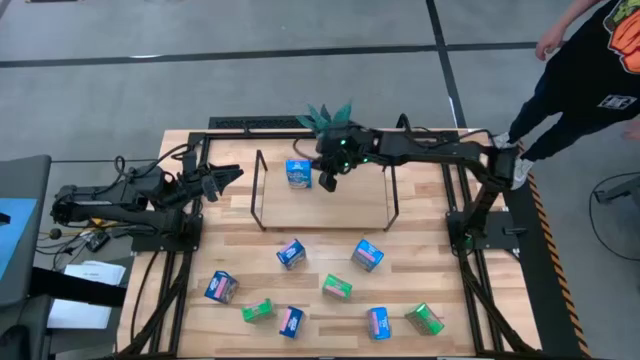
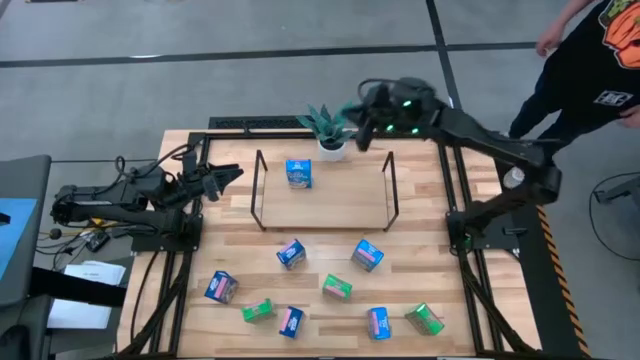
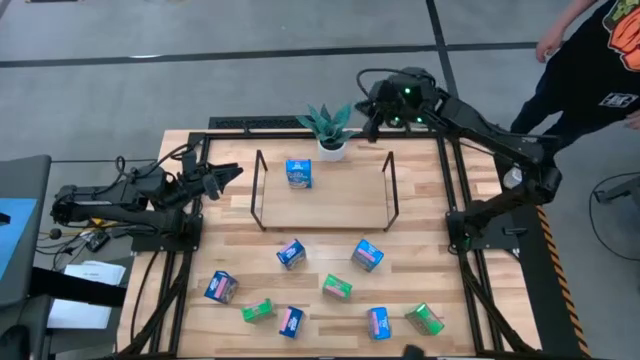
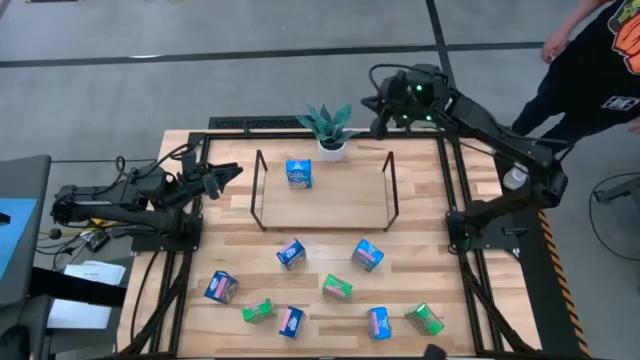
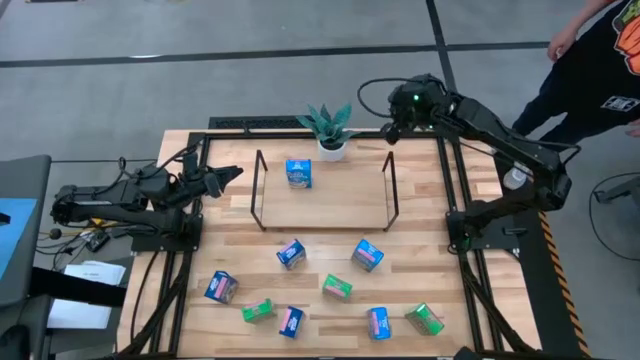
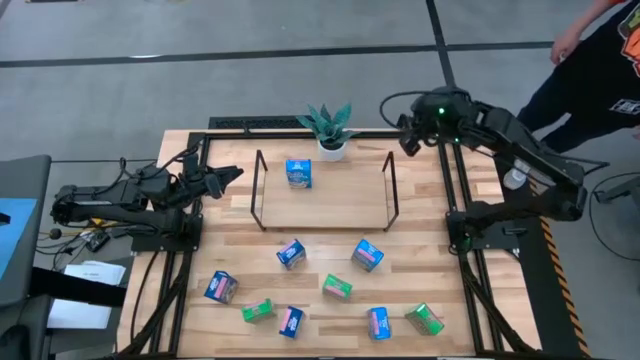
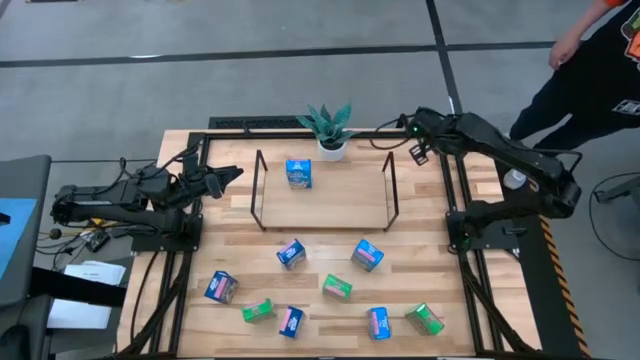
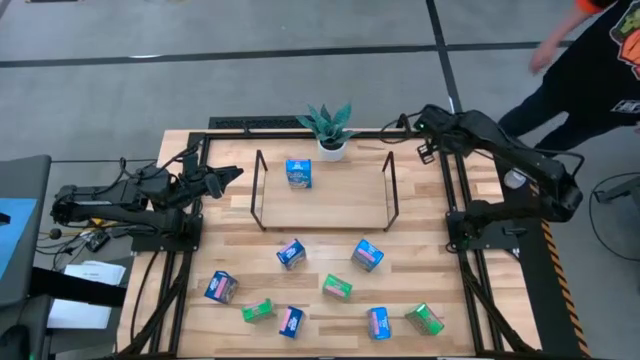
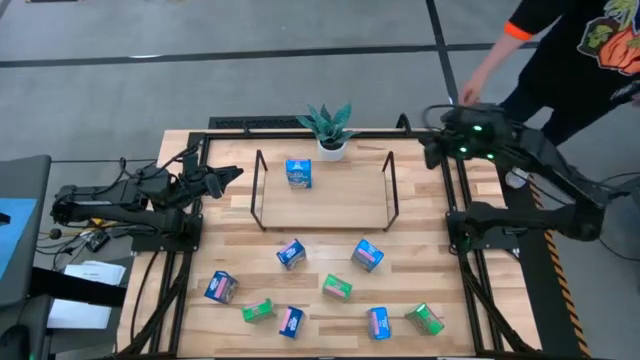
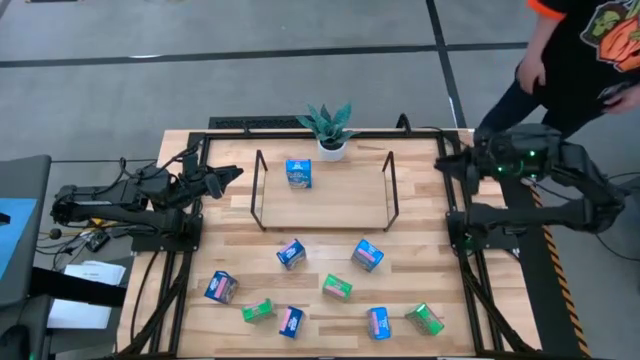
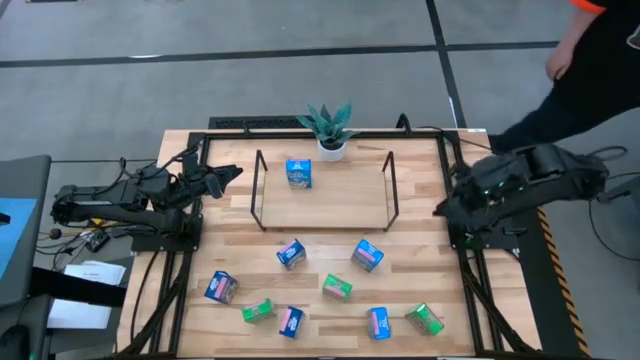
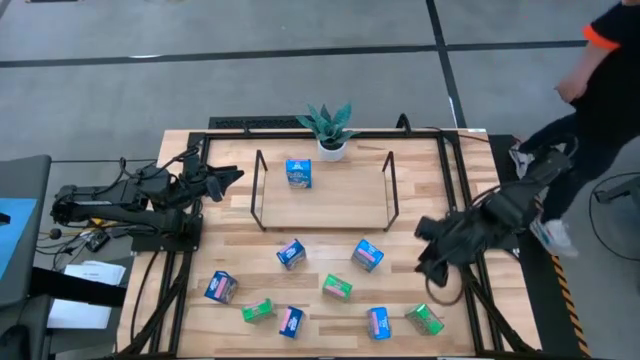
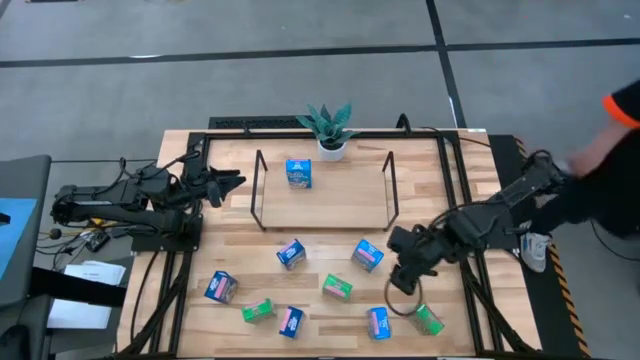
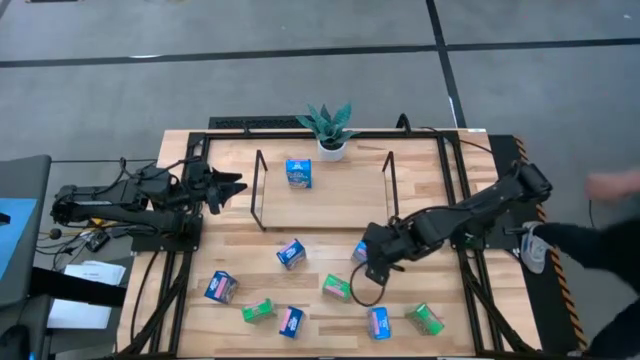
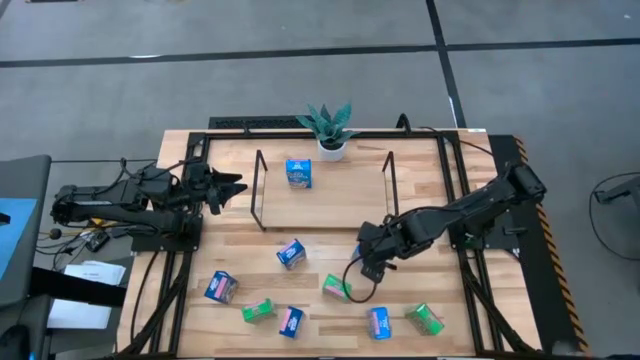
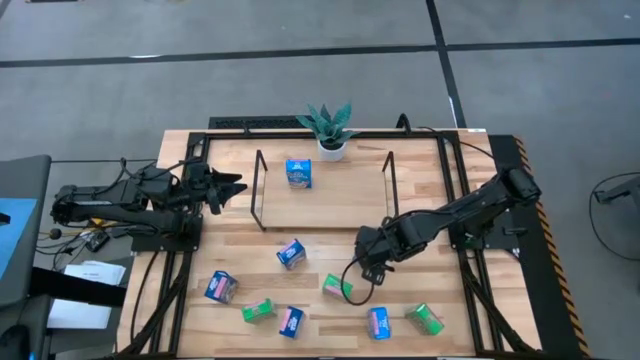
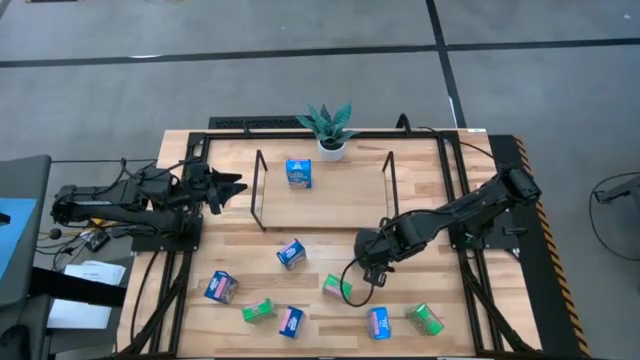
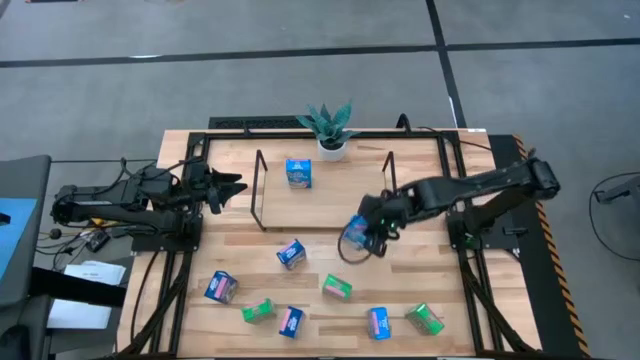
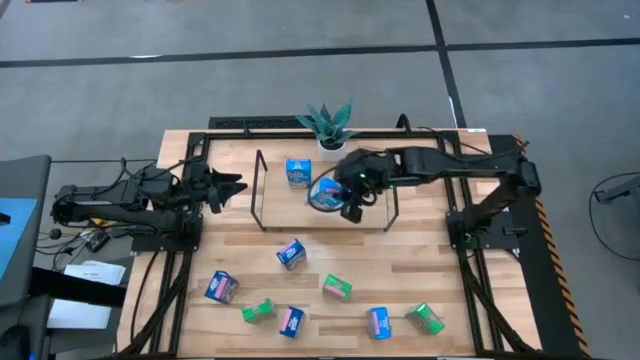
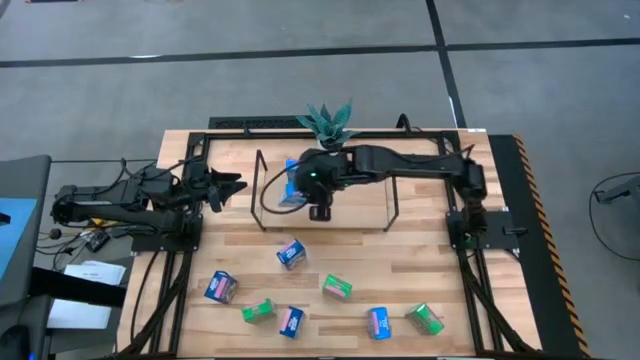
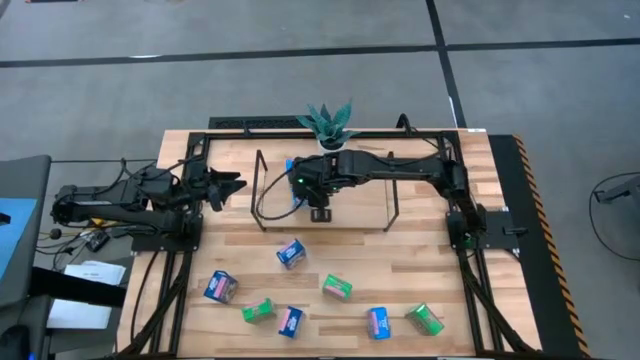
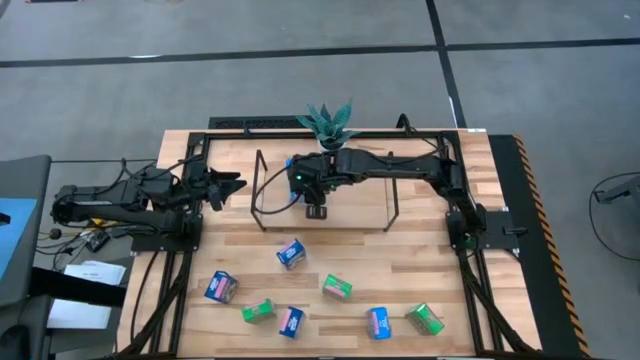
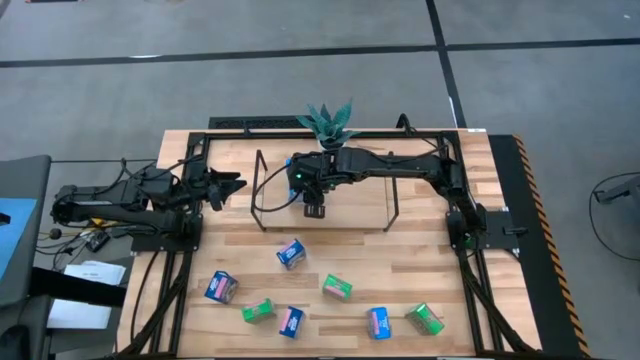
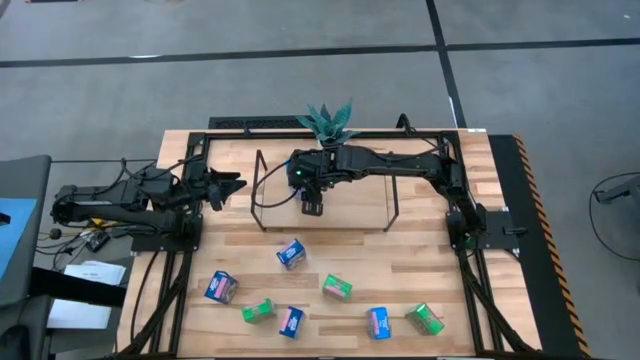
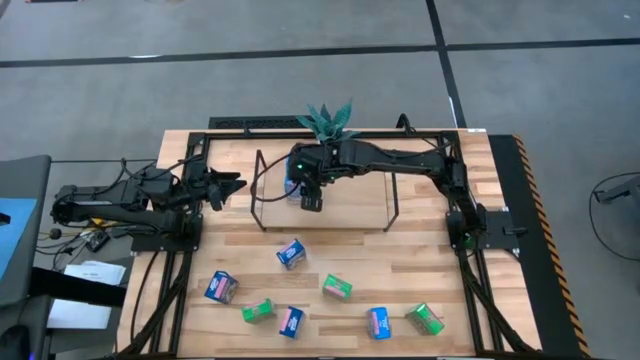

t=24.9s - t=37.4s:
Task: Stack cereal on shelf
Put the top light blue cereal box on the shelf aligned with the other light blue cereal box

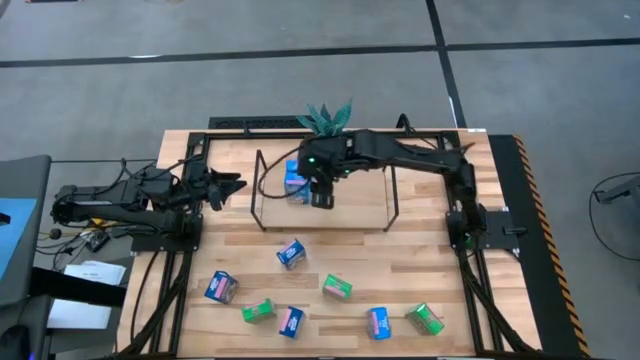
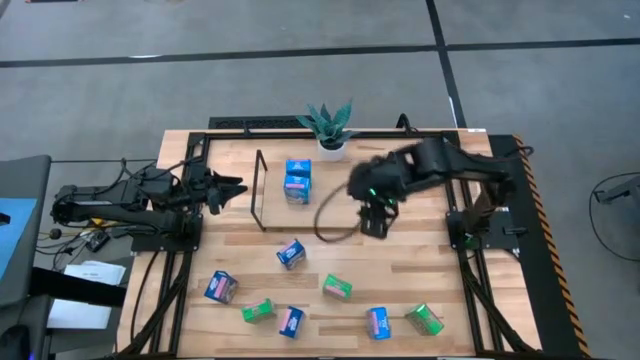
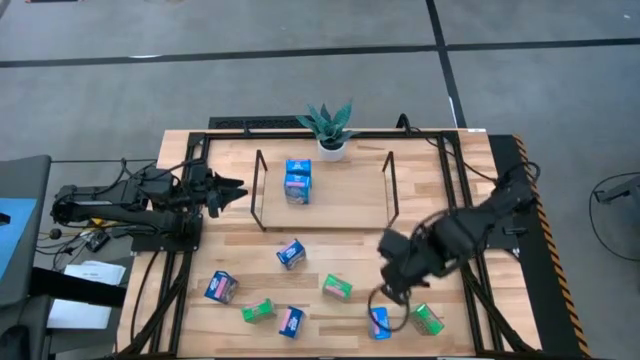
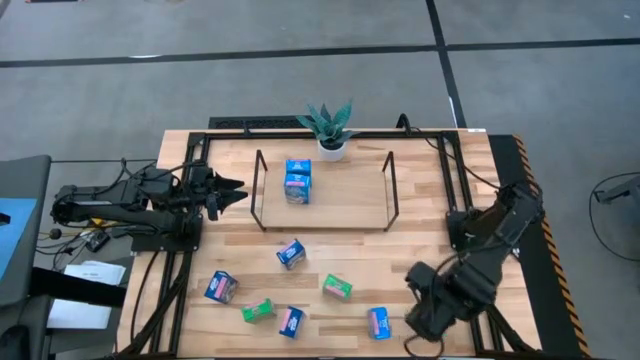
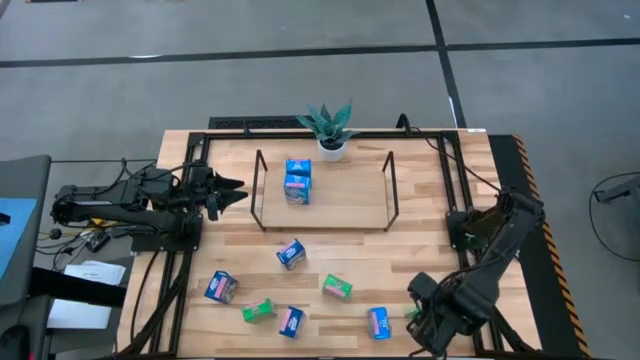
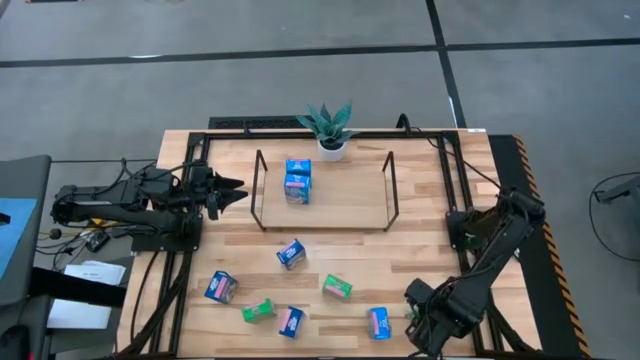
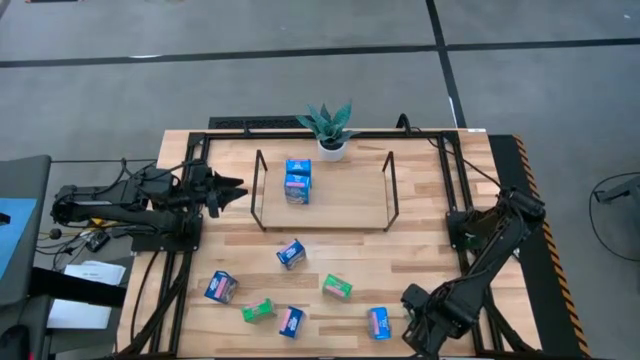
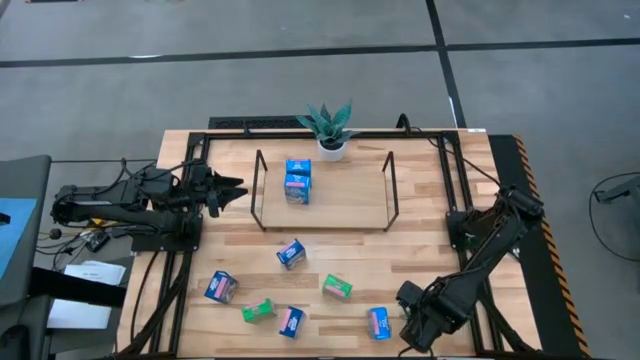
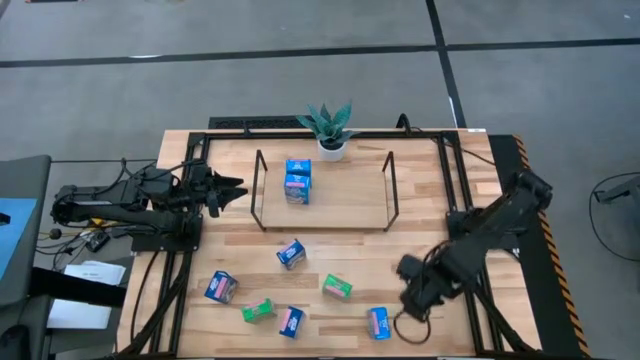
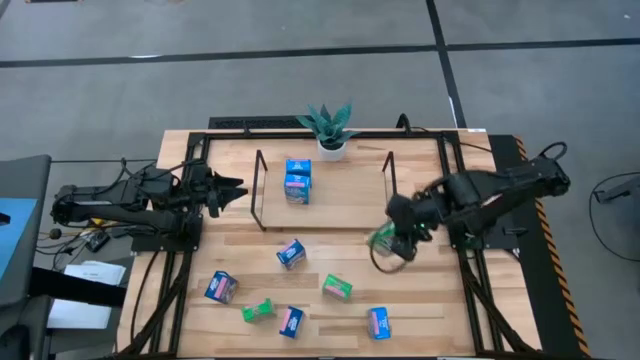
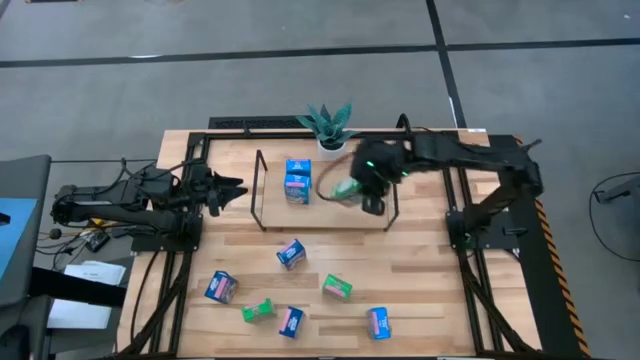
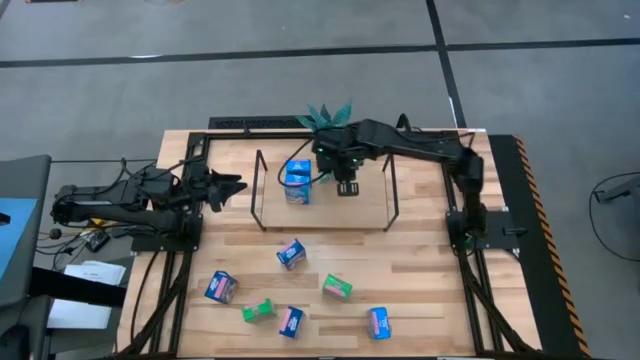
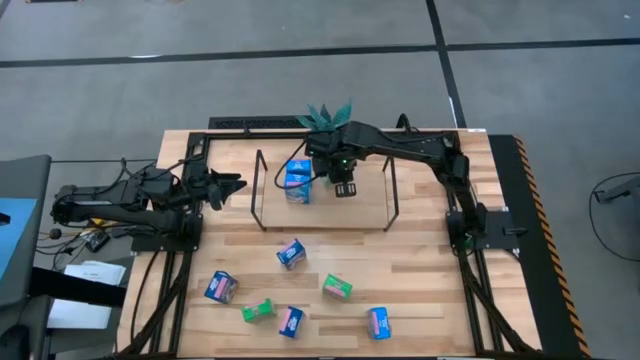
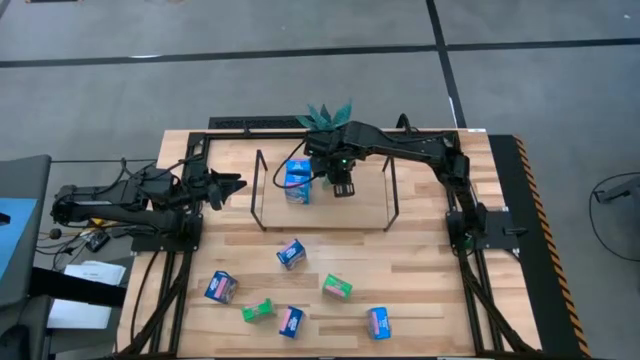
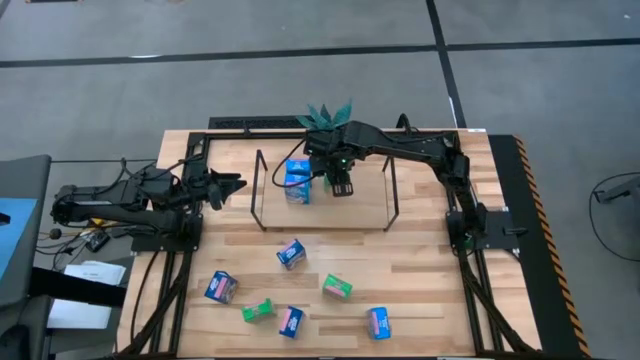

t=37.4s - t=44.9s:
Put the right green cereal box on the shelf
